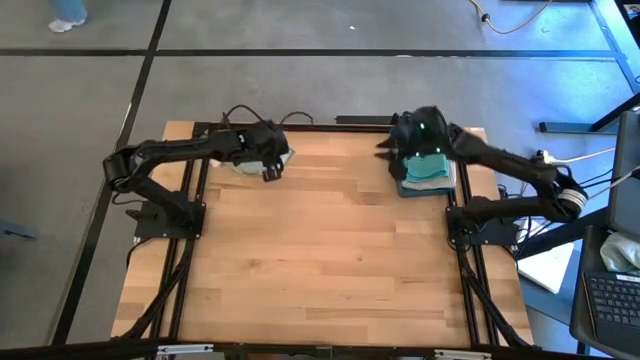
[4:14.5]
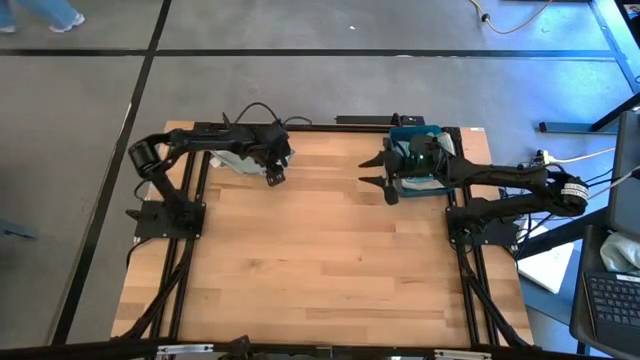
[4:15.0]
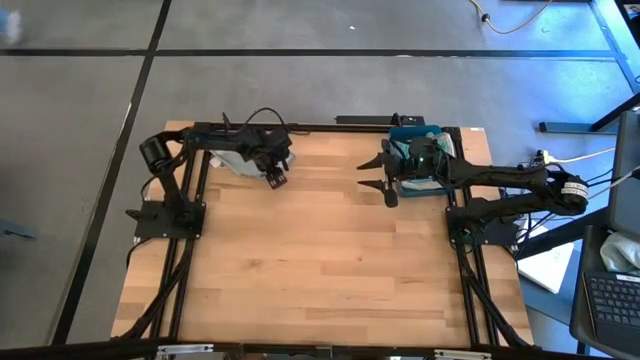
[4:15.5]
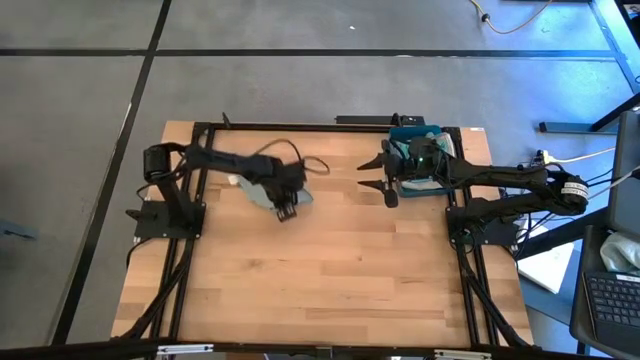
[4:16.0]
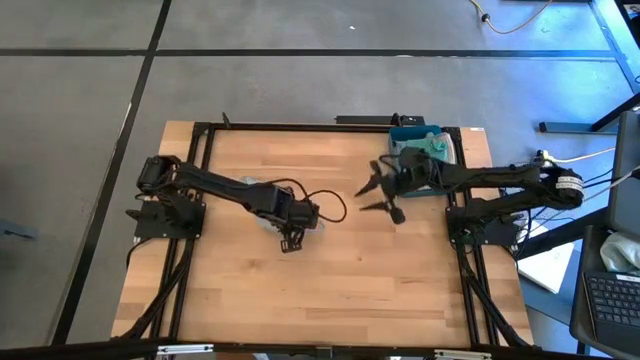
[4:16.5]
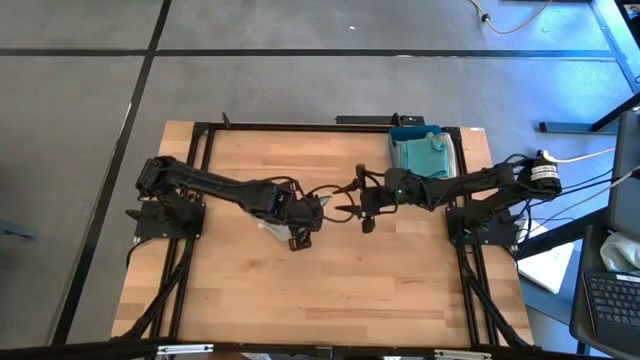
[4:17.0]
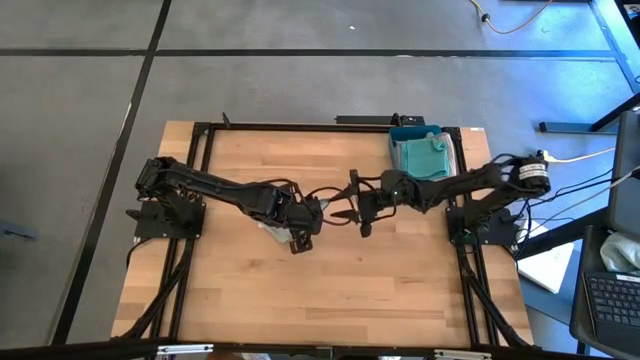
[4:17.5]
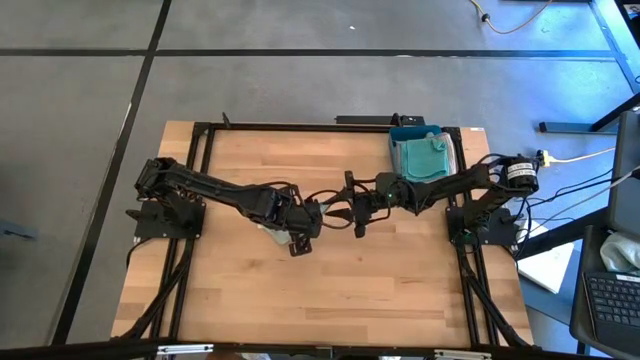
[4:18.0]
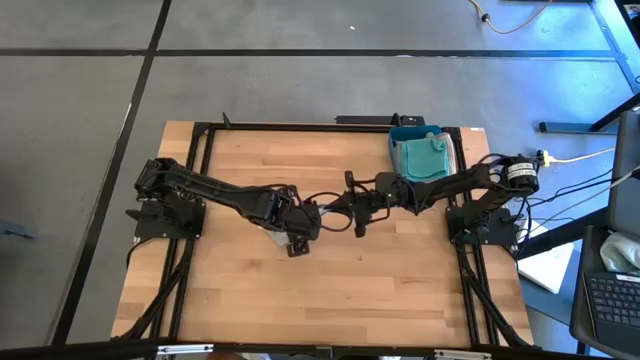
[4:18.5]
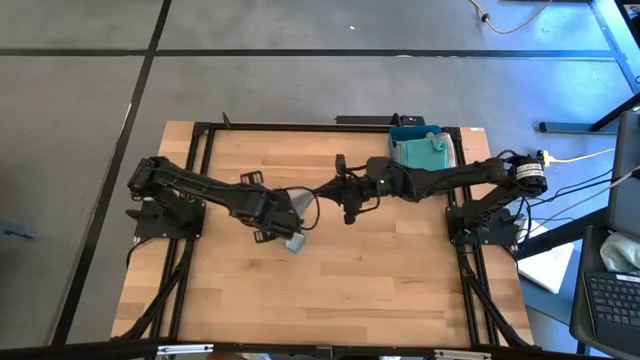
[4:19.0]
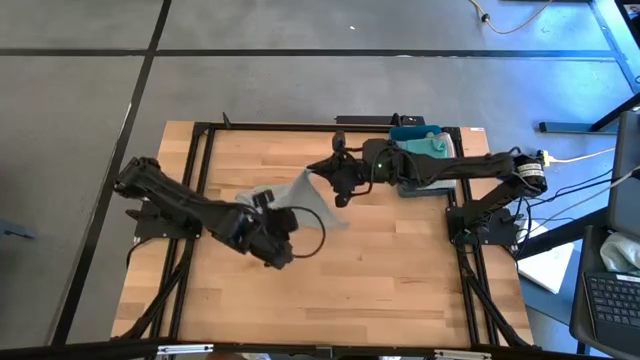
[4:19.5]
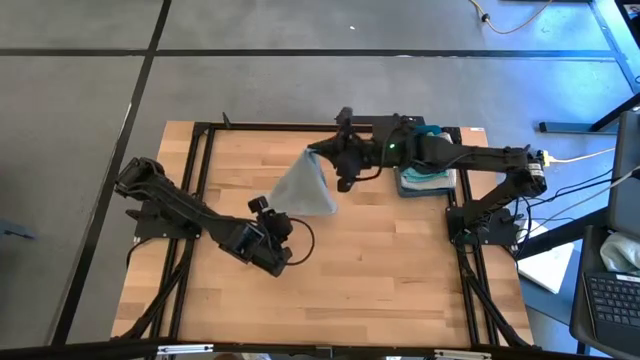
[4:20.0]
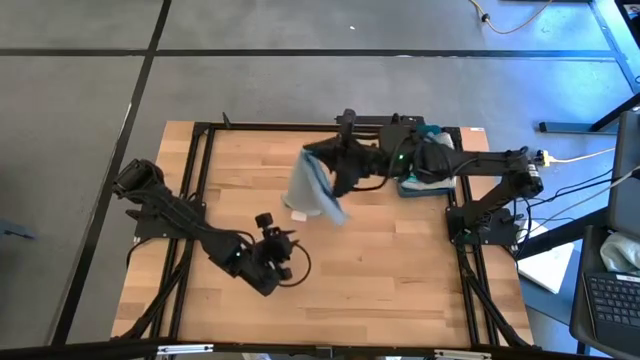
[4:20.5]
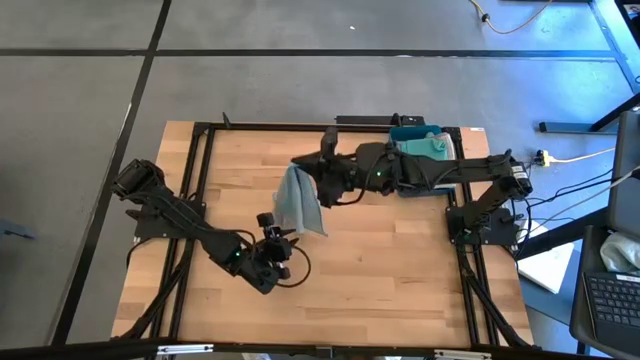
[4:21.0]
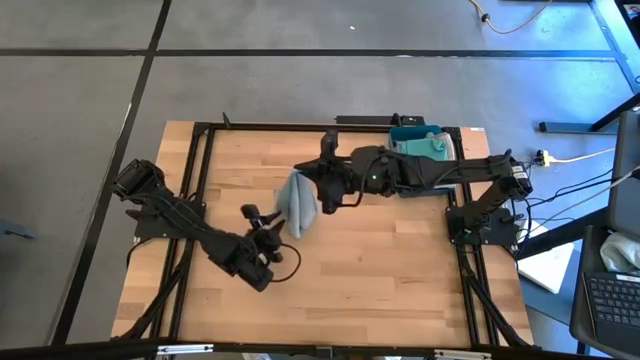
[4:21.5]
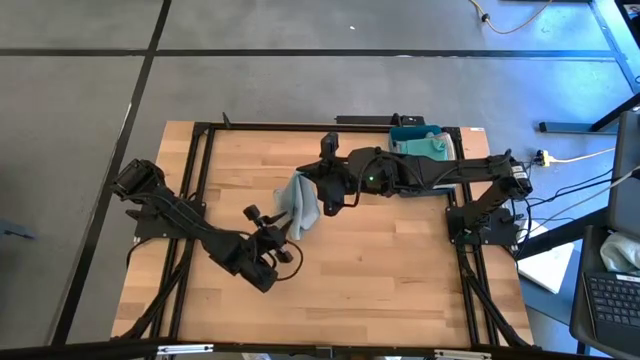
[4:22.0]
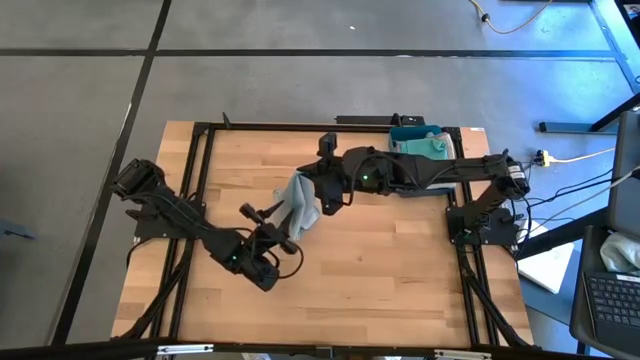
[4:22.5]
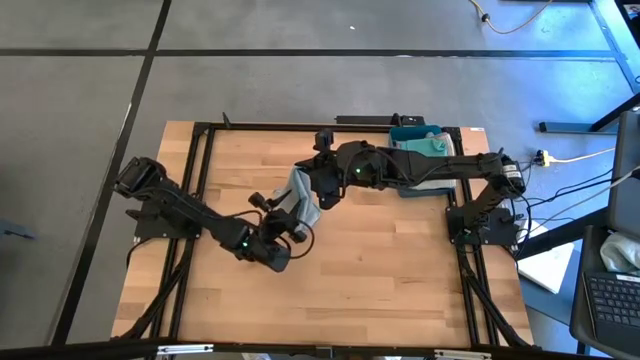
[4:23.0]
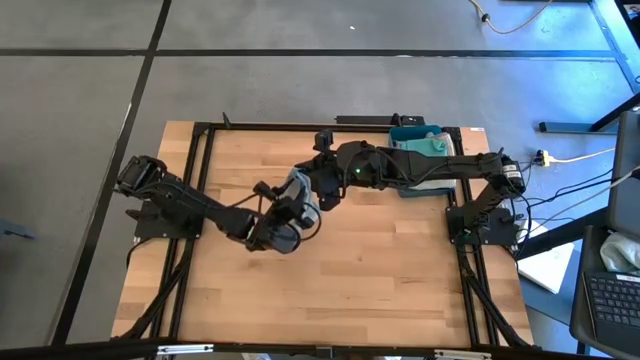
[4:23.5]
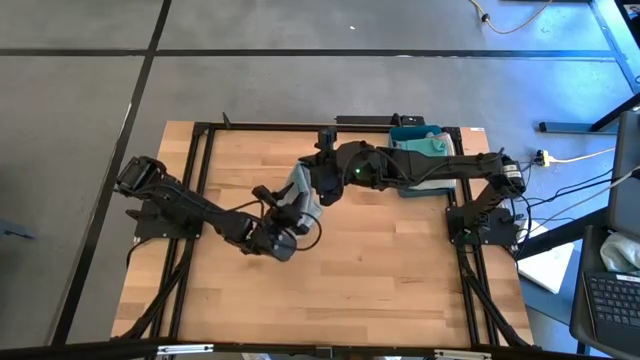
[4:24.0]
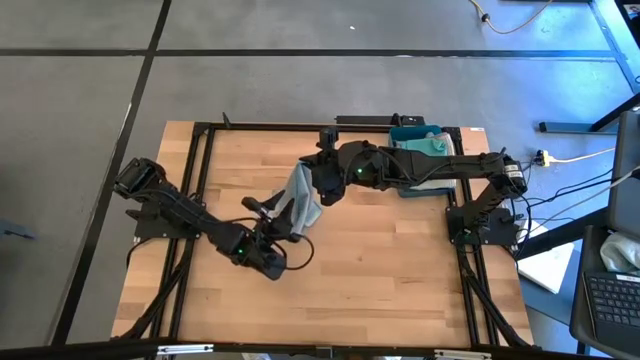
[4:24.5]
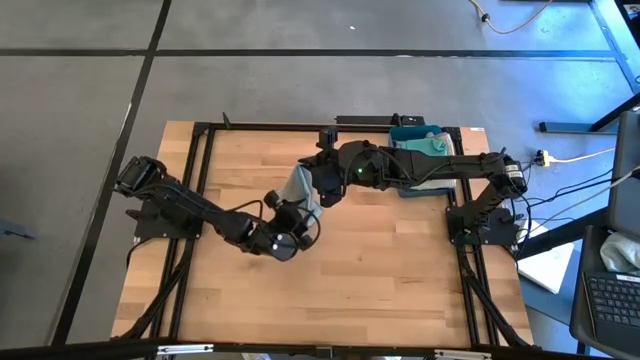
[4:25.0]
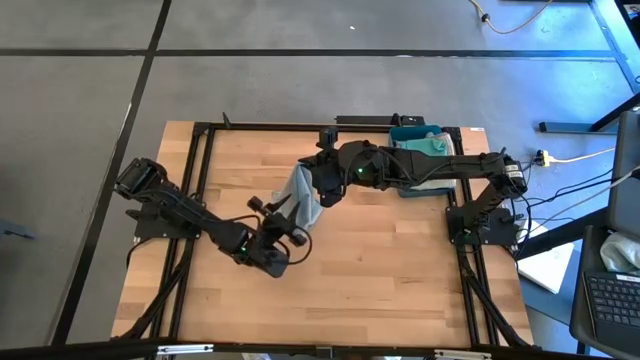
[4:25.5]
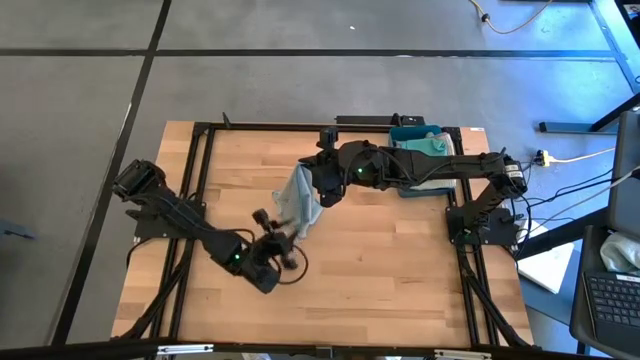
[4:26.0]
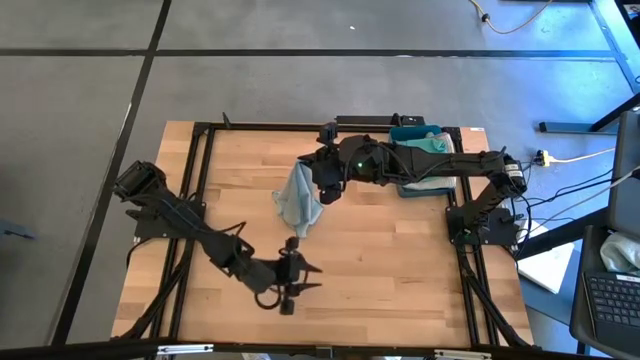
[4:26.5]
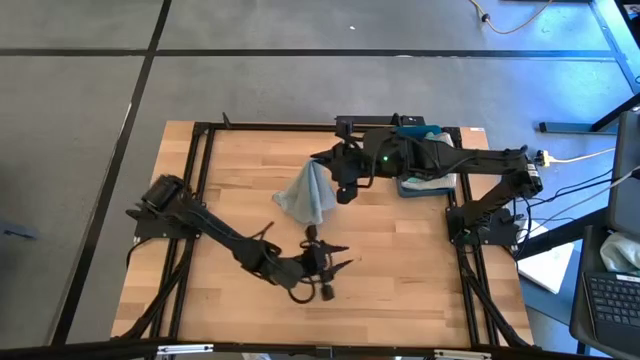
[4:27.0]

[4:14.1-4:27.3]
Task: Fold microfiber towels
Fold the light blue microfiber cloth

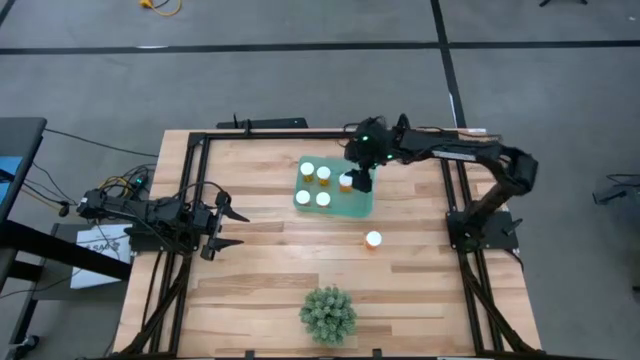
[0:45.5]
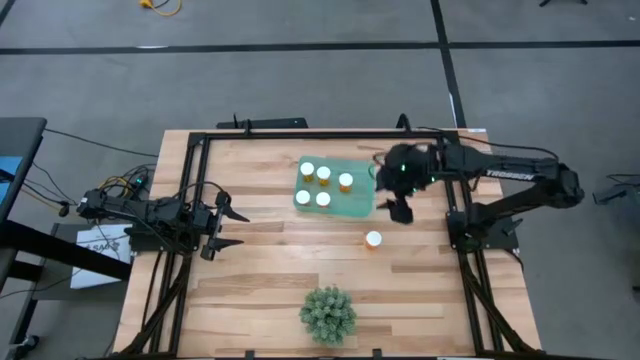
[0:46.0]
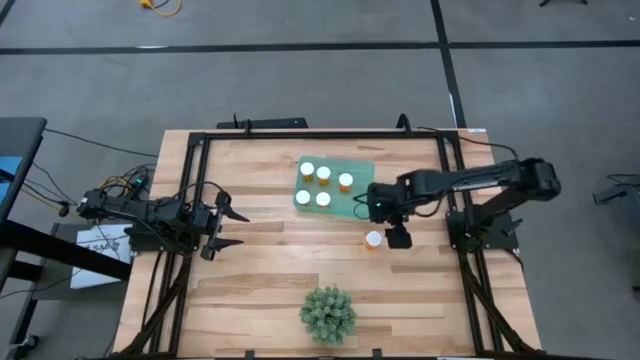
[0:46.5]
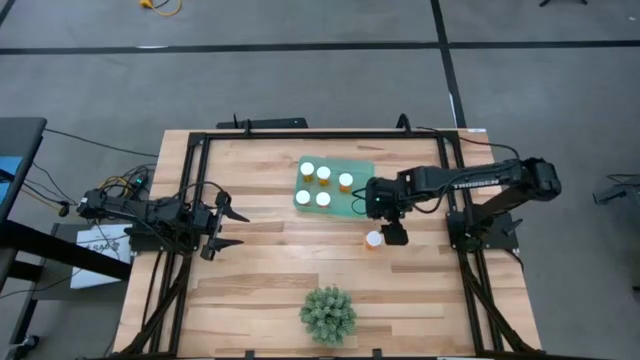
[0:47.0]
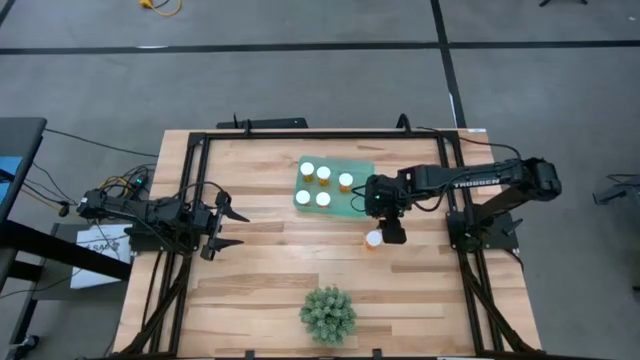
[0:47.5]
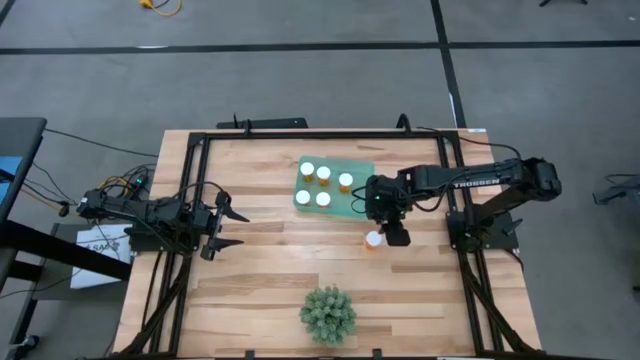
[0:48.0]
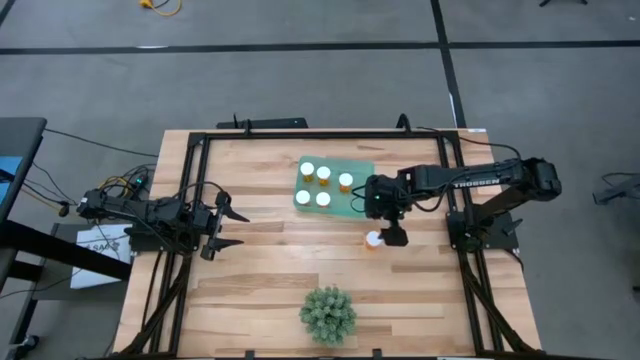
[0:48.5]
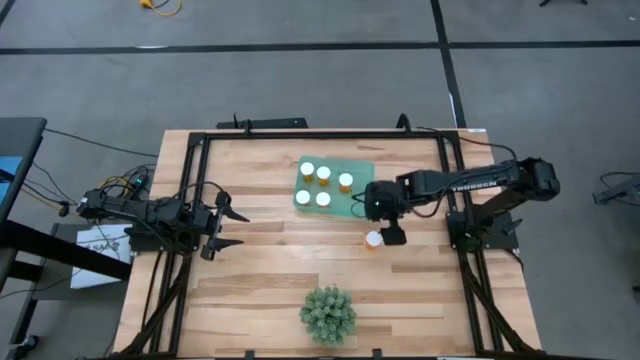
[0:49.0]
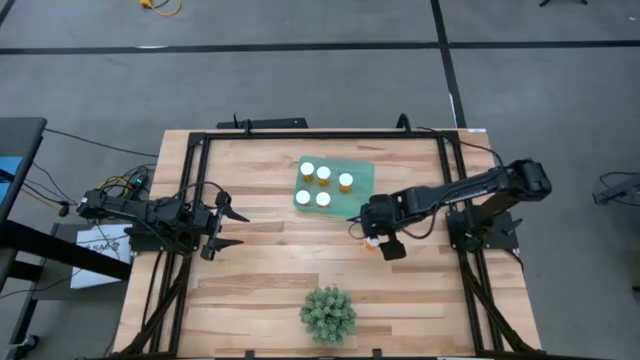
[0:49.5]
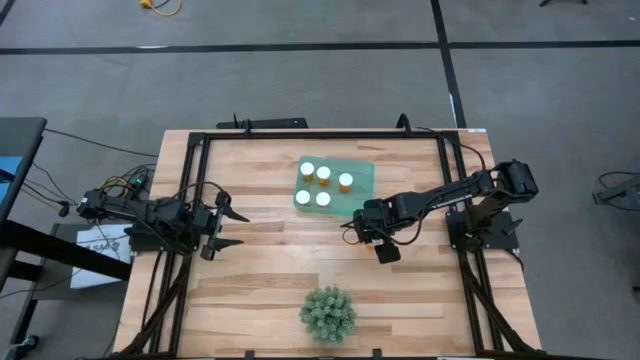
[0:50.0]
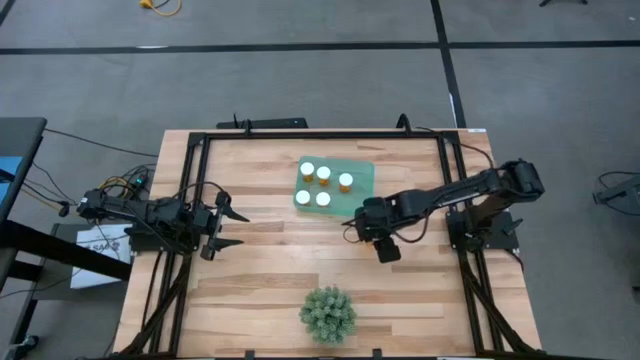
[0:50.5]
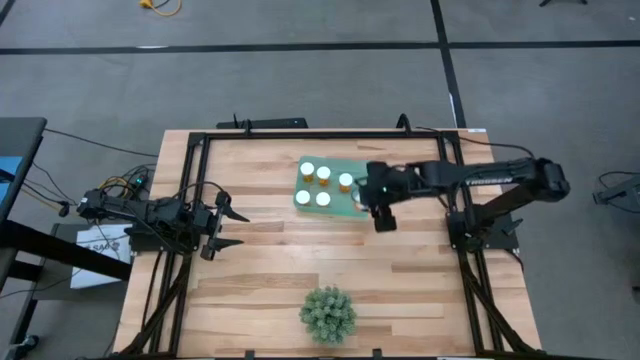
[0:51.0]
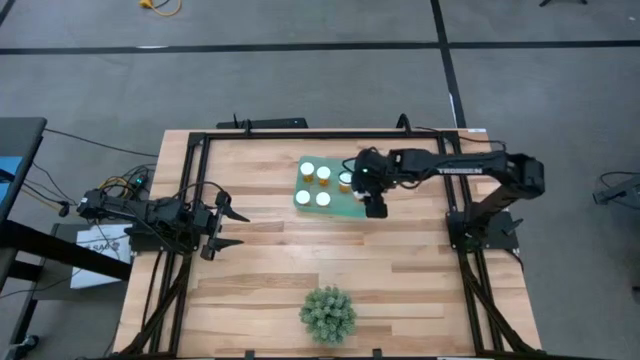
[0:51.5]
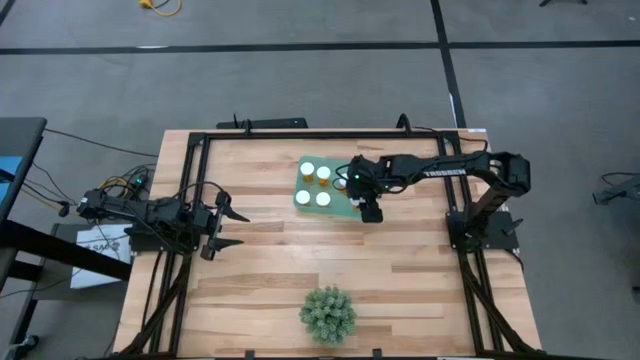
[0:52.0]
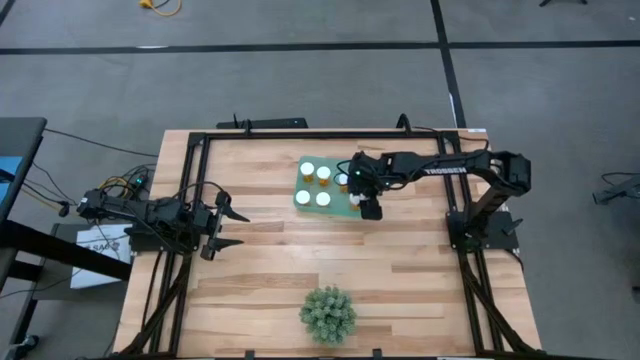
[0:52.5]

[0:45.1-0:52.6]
Task: Pick and place pill bottles into a basket
Put the orange pill bottle into the green bin

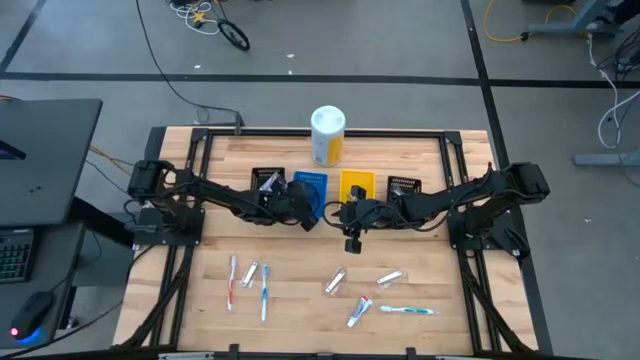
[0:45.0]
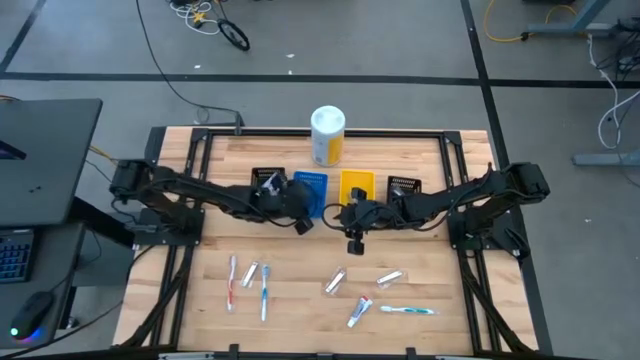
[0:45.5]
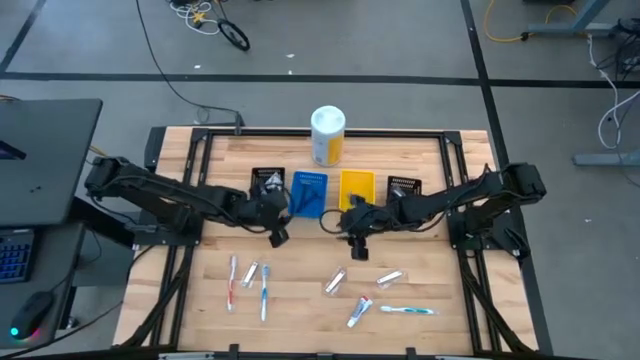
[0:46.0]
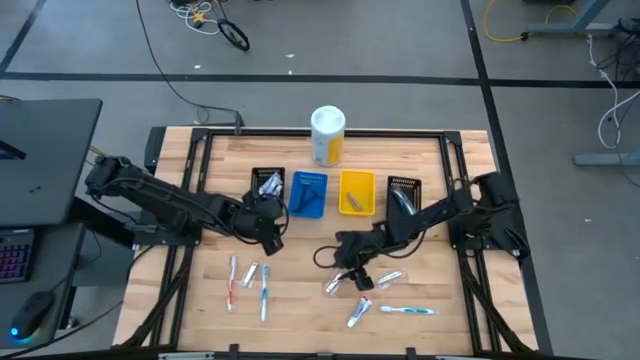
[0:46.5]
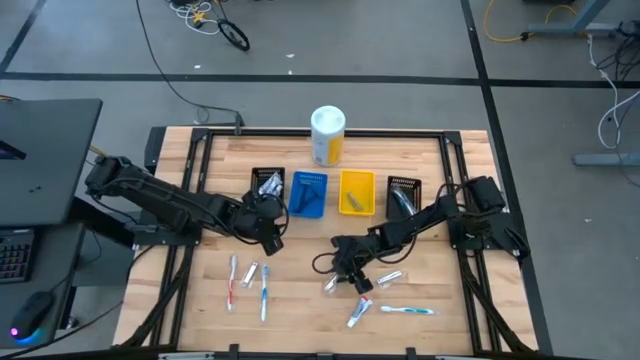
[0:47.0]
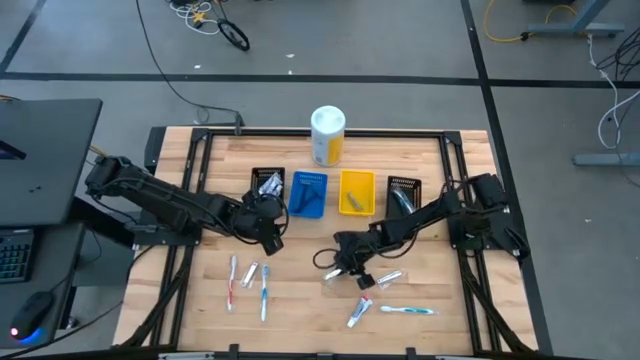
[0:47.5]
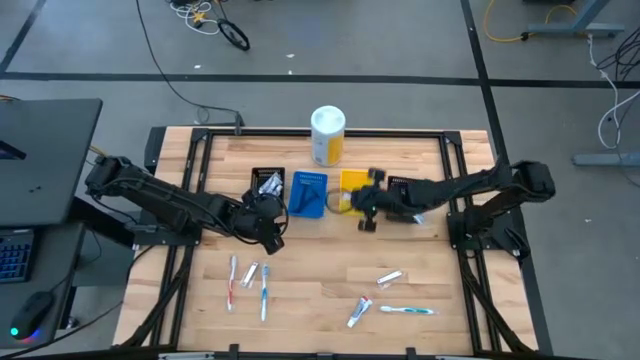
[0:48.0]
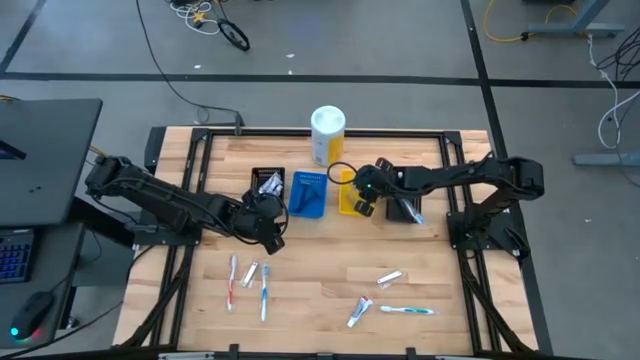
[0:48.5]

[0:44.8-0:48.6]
Task: Pick & Place Travel size toiletries
Put the nail cutter into the yellow bin
